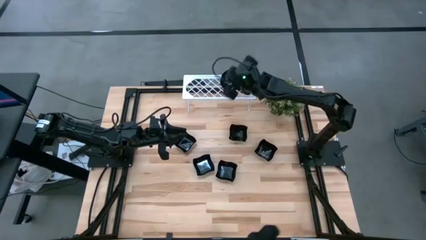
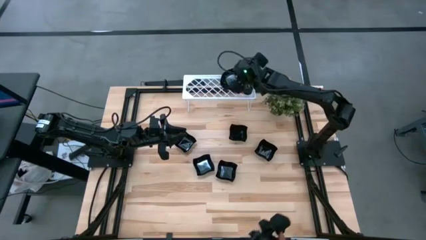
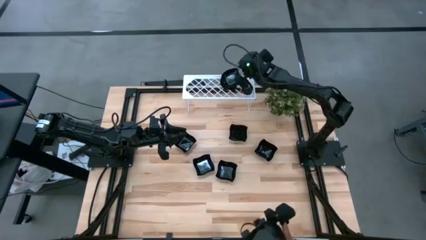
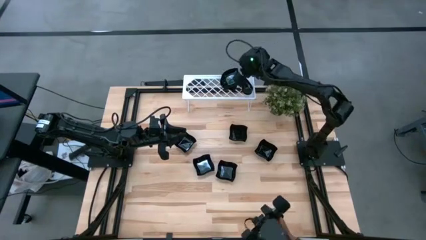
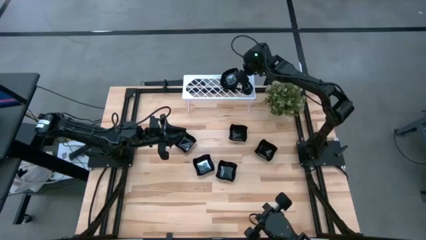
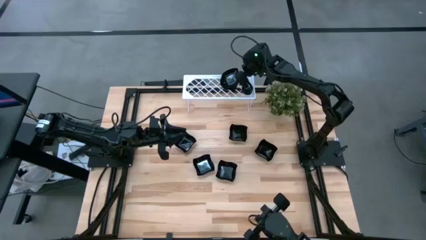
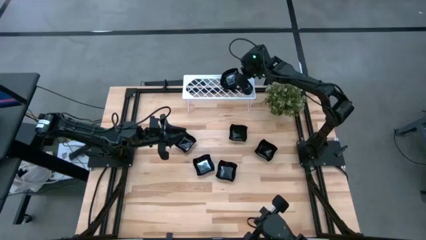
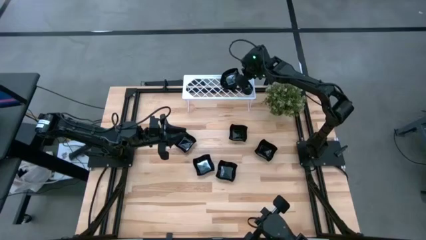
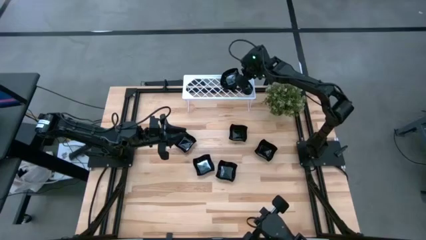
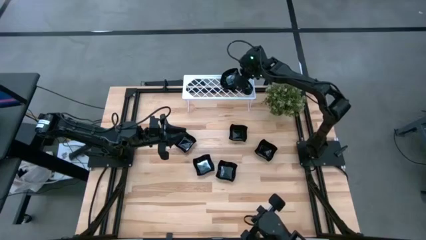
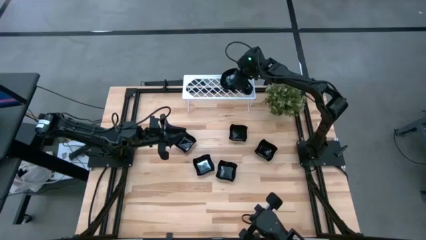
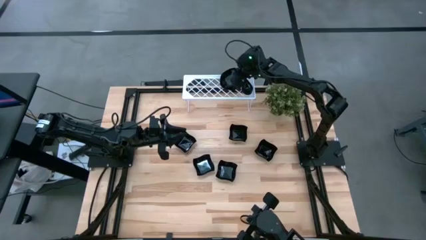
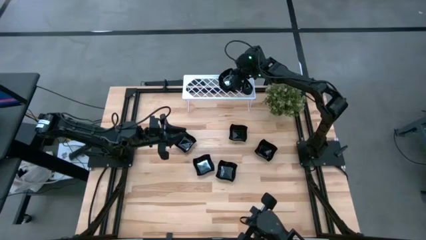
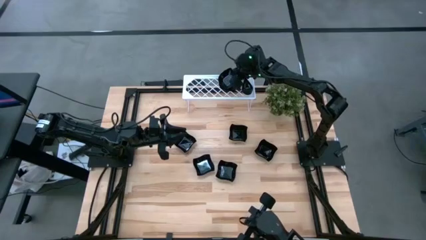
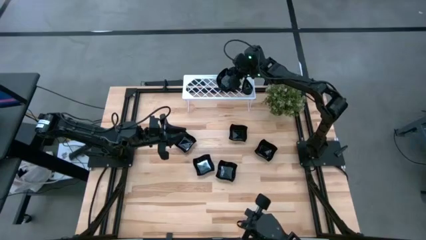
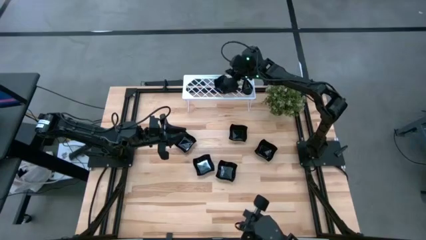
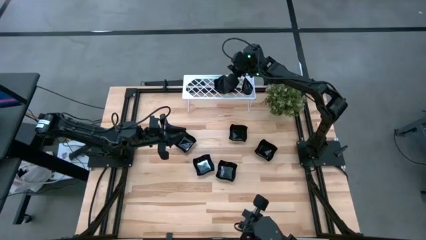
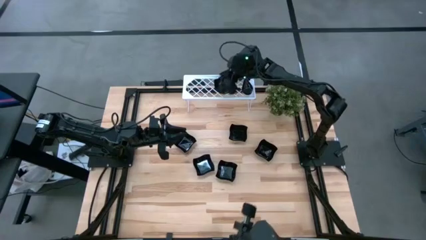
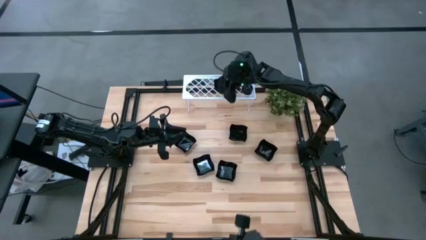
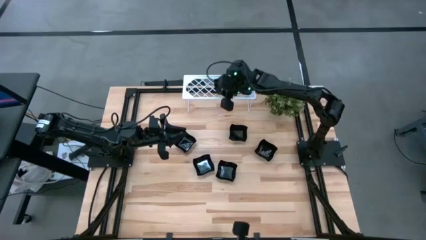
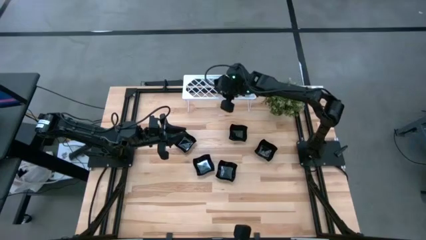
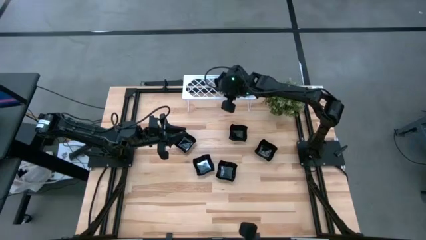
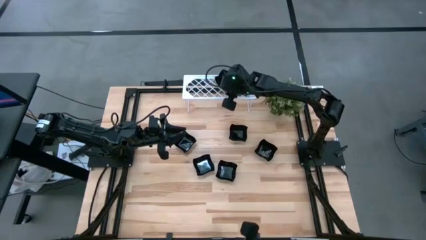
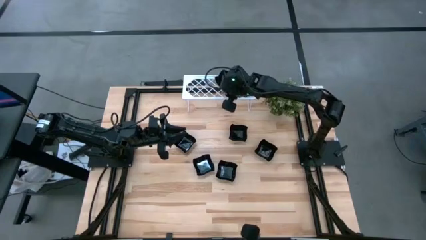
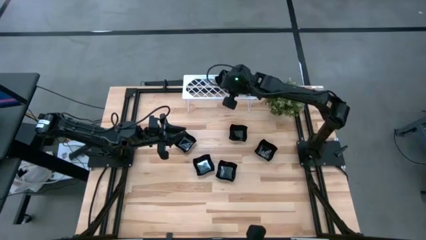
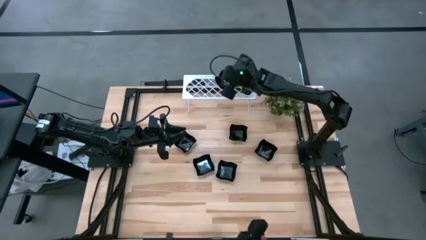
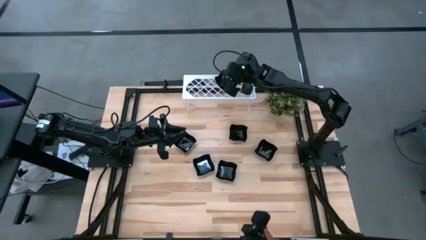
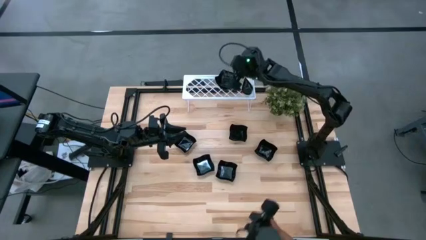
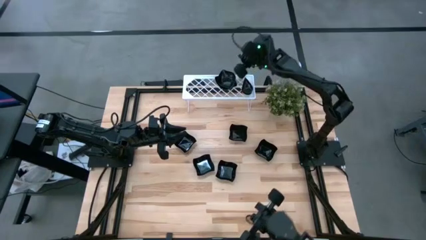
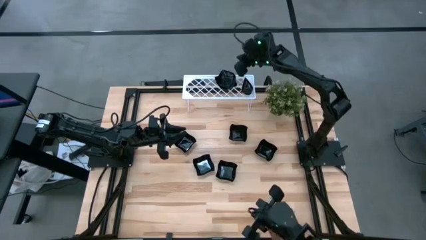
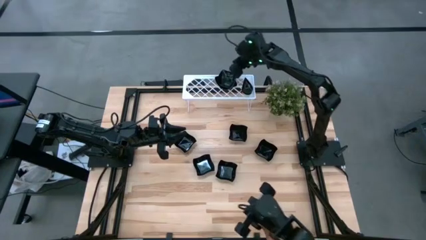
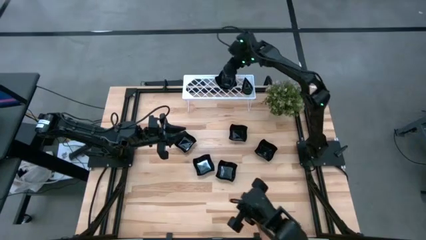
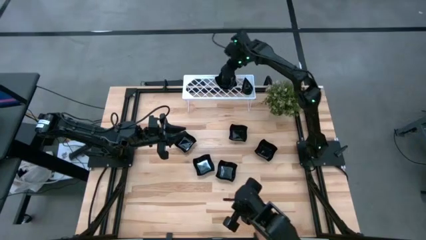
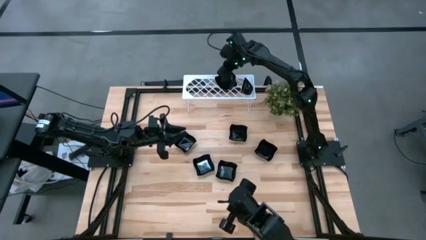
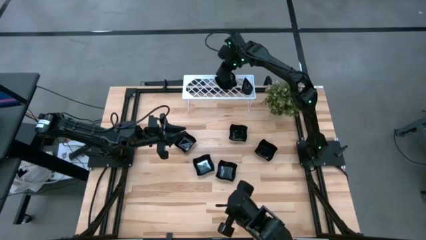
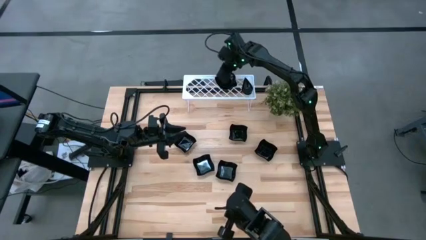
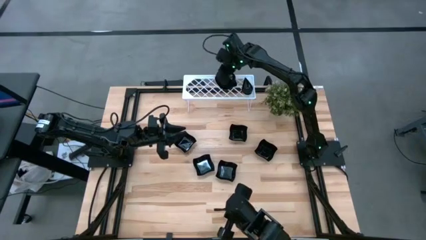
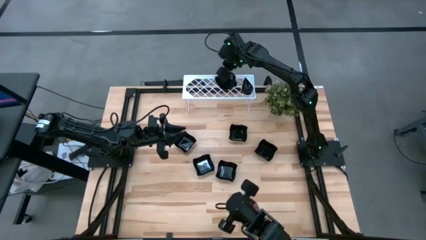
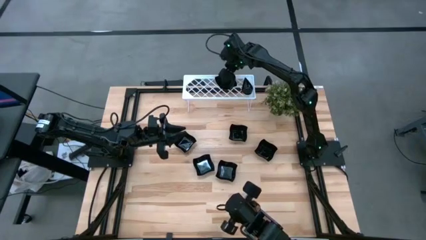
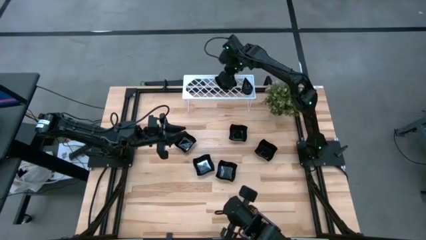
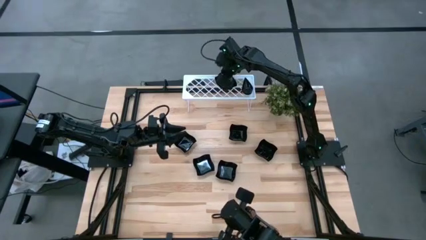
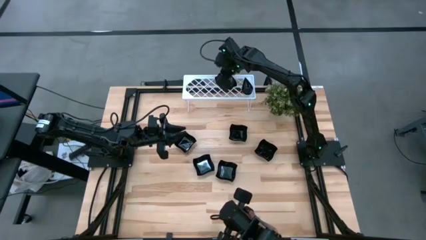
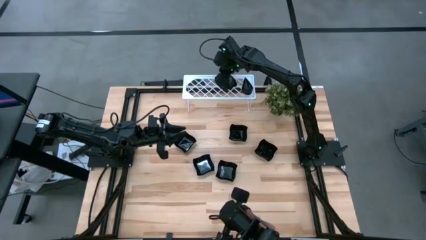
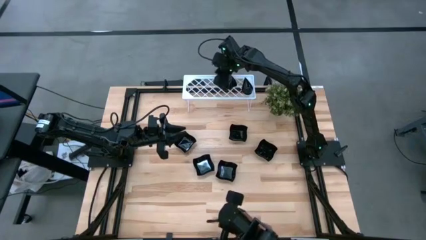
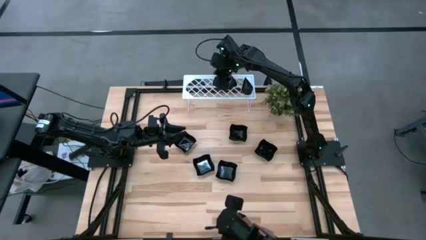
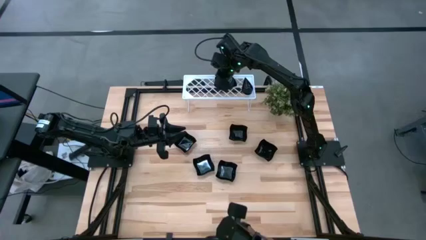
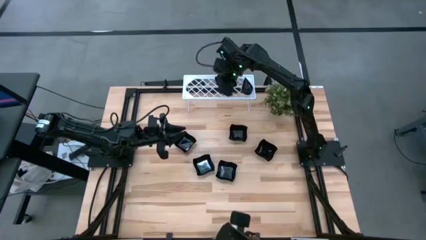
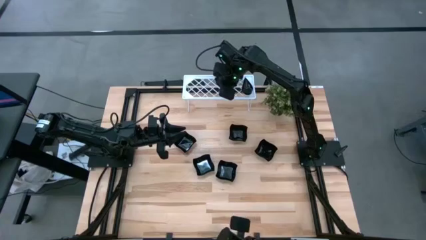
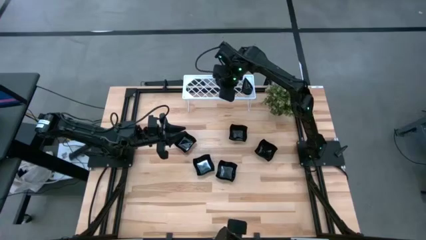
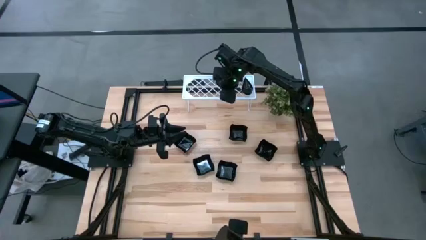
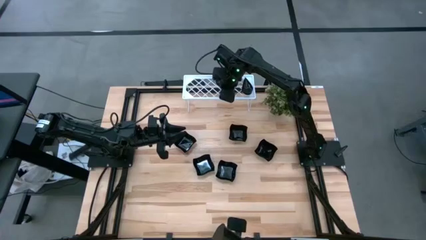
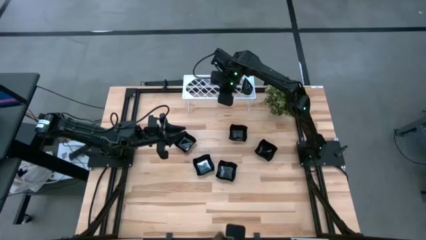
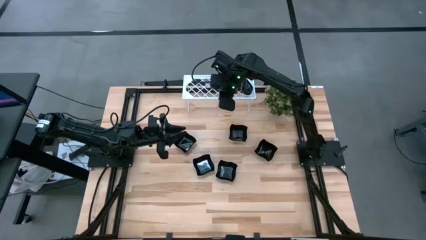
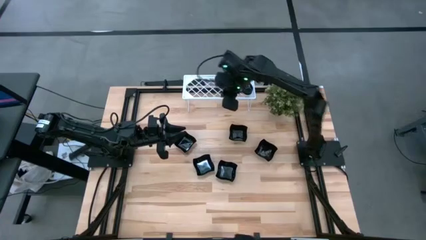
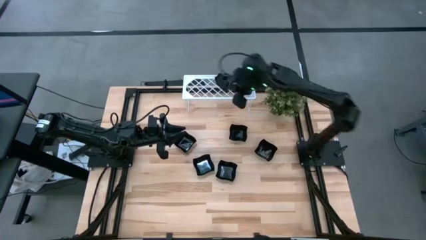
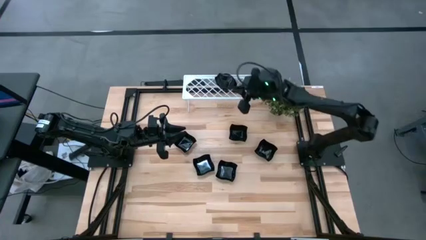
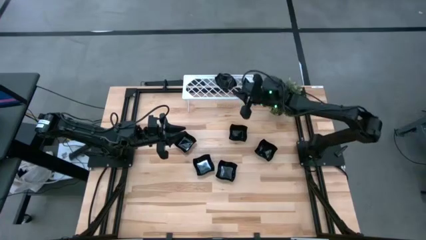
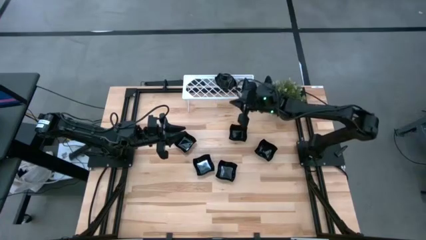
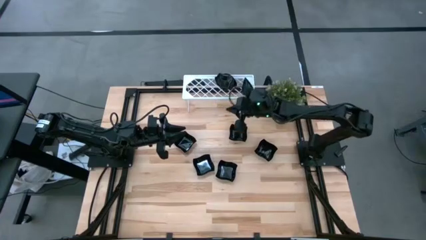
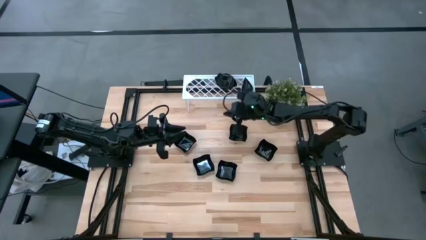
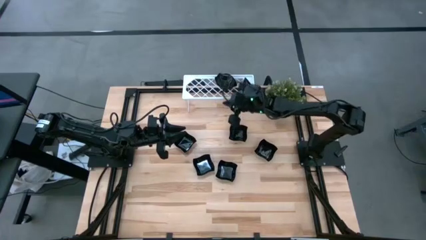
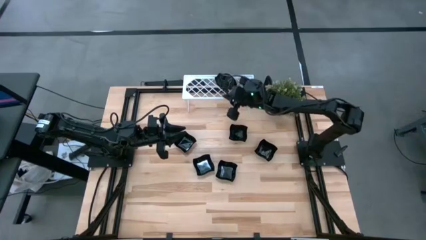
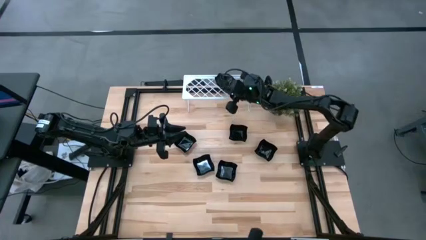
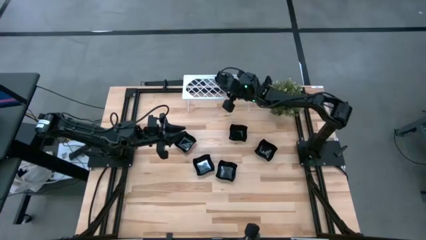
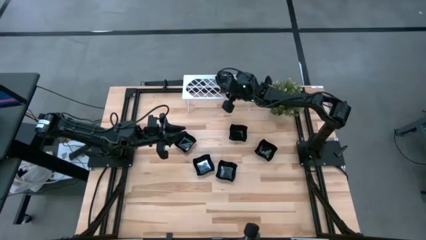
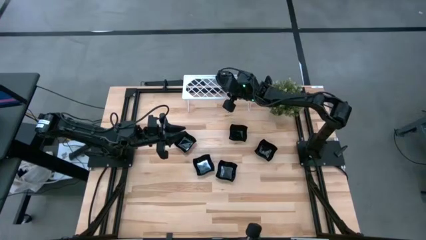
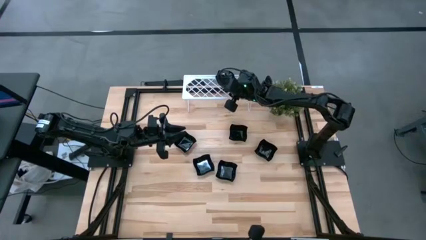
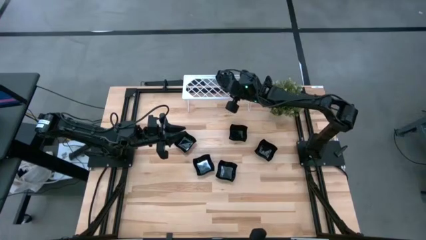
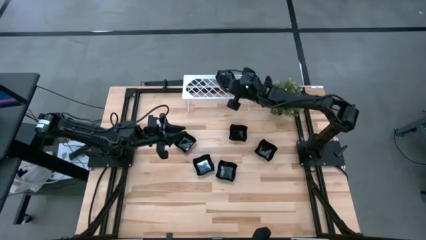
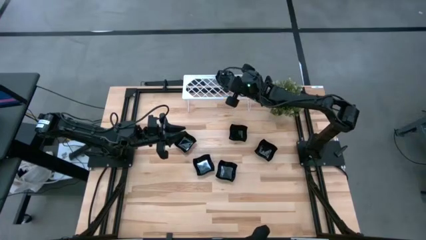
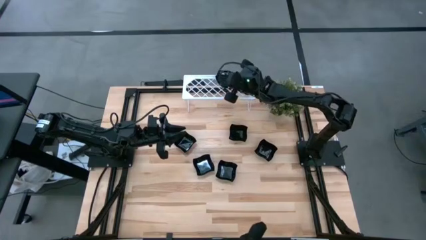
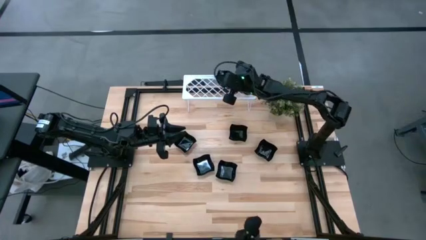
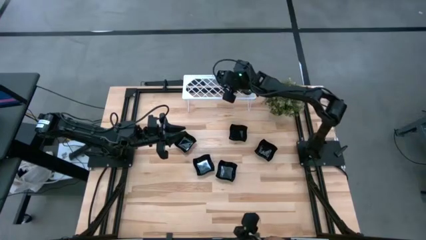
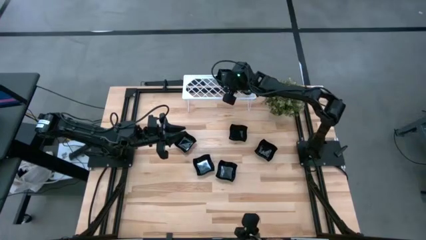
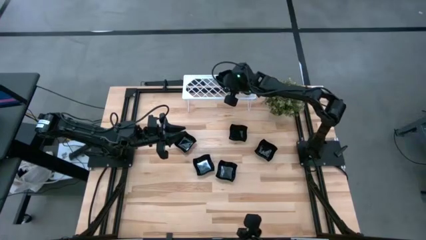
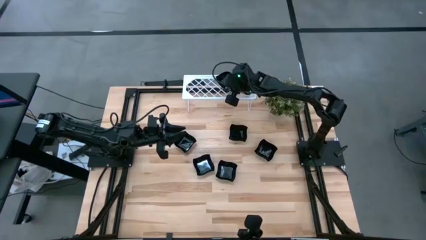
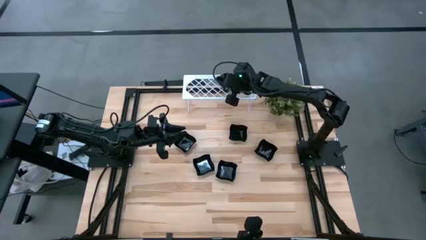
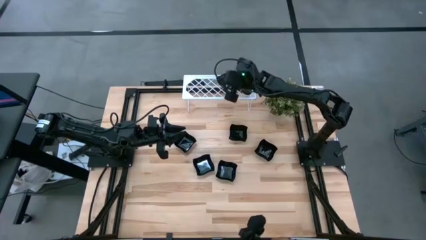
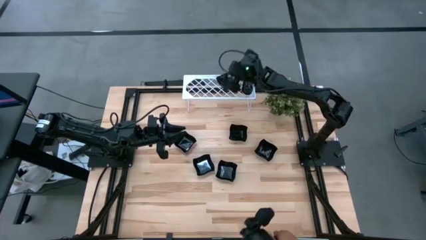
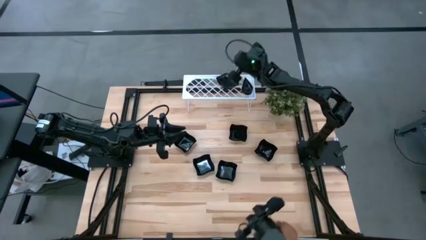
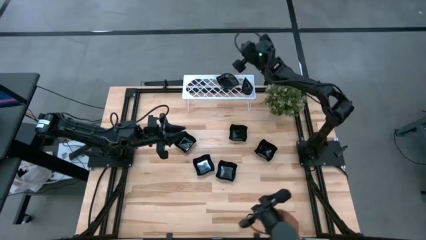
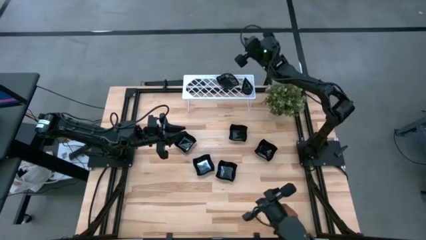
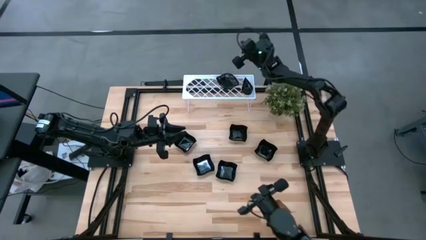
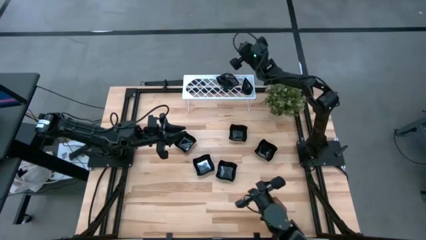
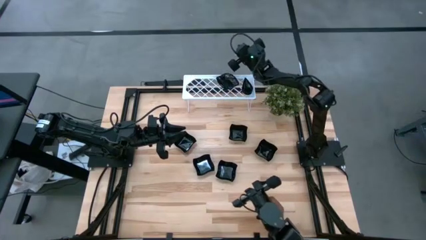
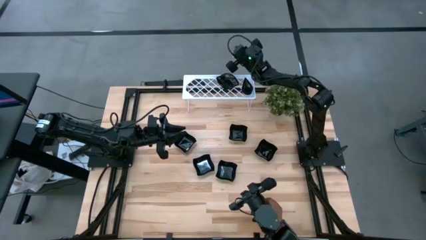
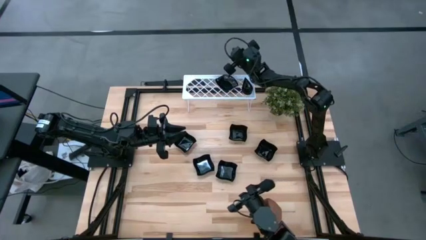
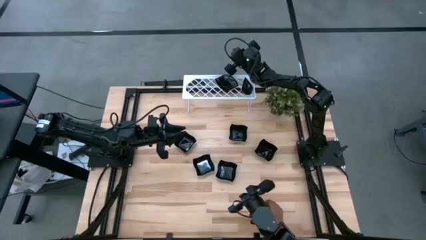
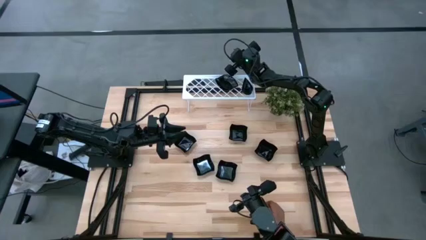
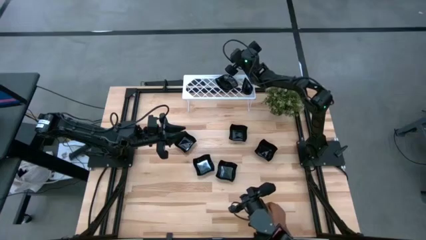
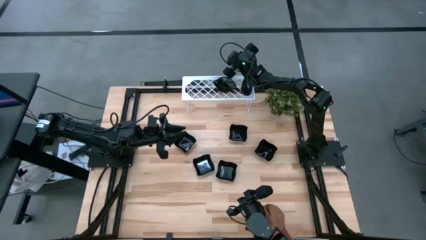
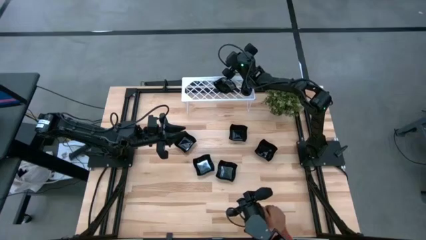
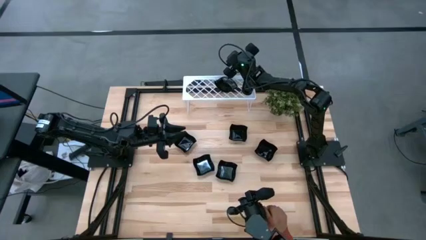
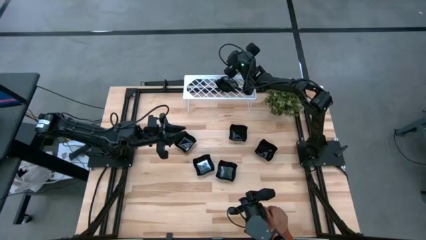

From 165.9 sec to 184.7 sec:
Task: Pick & Place Mini shaped plates
Stack the leaf shaped plate on top of the leaf shaped plate on the shelf
